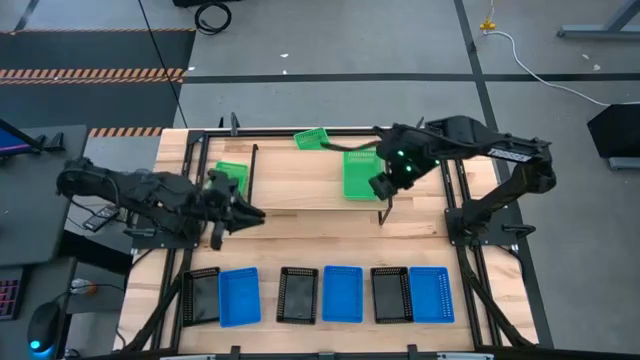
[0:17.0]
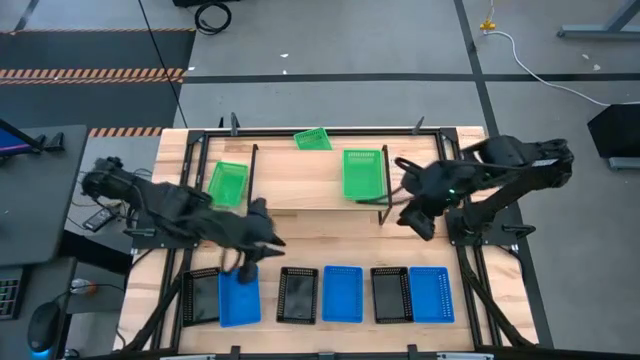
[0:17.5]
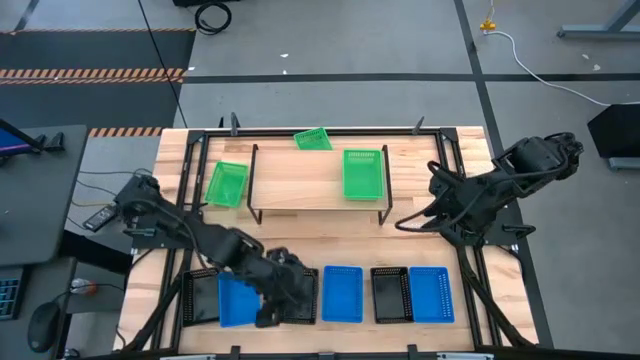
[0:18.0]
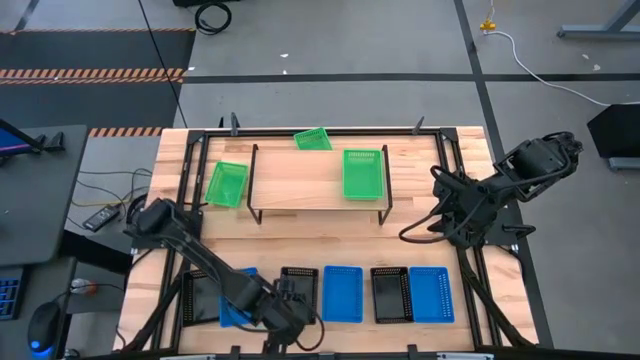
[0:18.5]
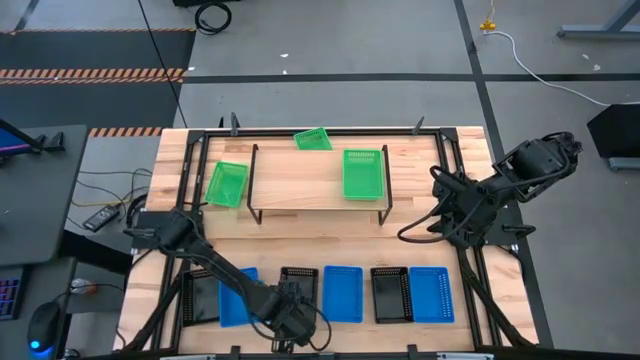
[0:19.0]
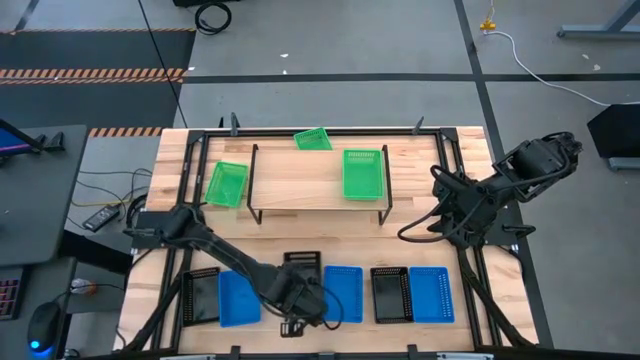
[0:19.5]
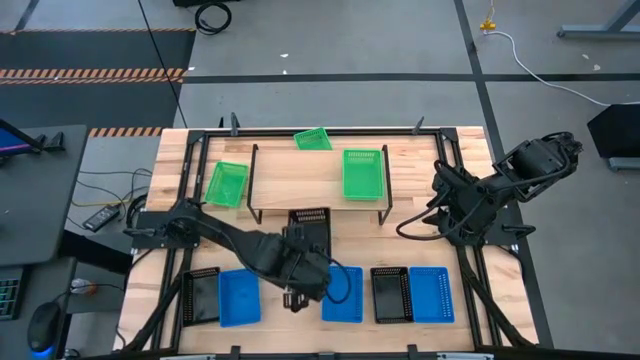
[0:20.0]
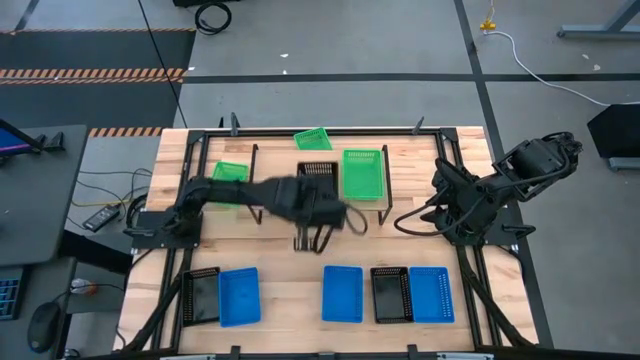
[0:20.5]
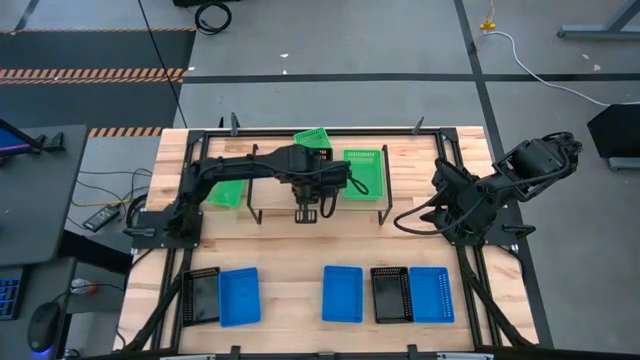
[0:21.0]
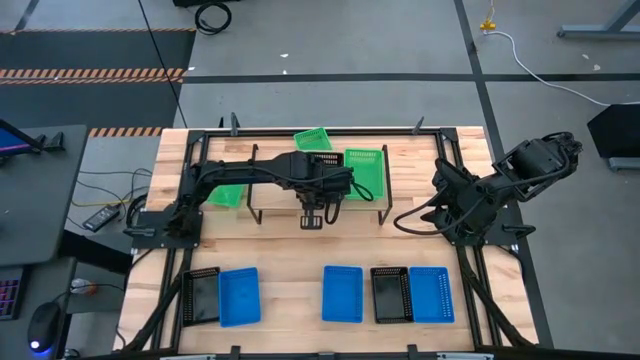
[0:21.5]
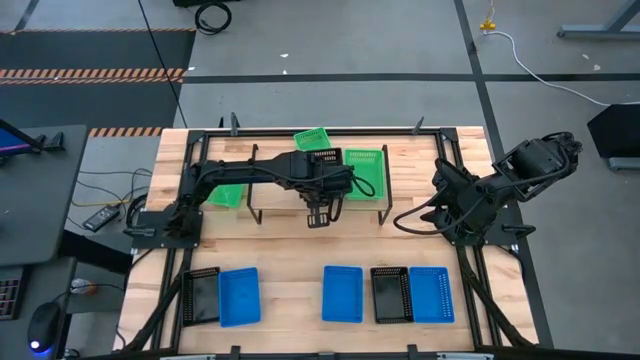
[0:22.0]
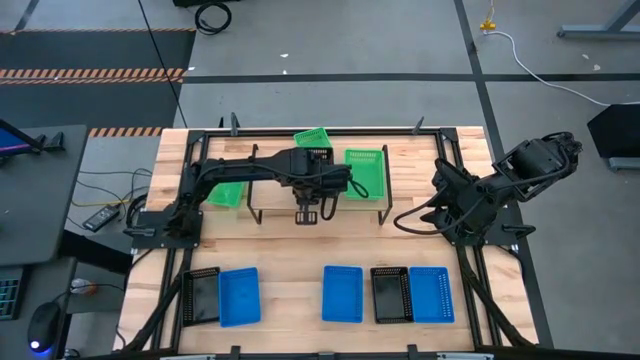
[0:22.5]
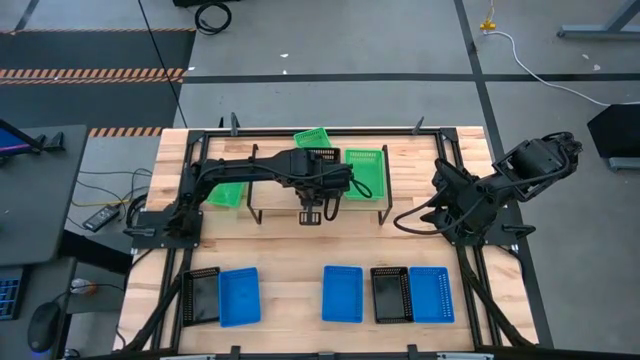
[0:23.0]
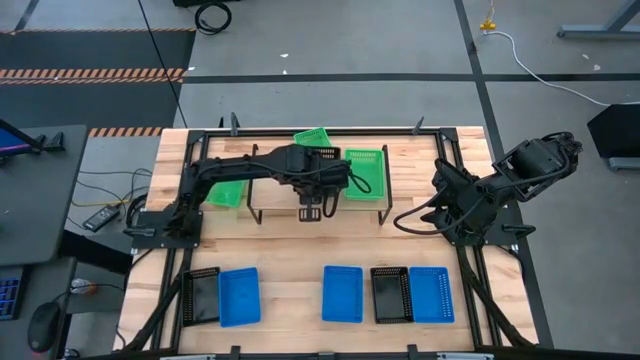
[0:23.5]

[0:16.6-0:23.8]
Task: Stack baskets on shelf by color
Put the middle black bin on the shelf

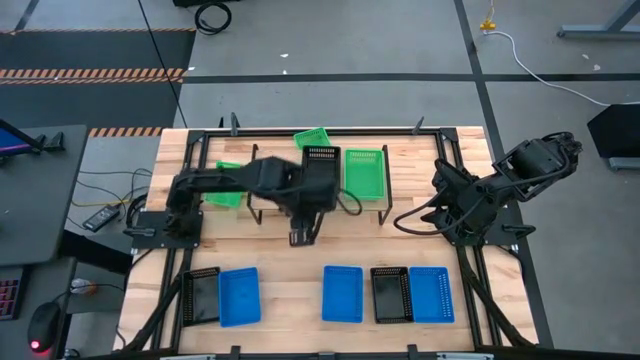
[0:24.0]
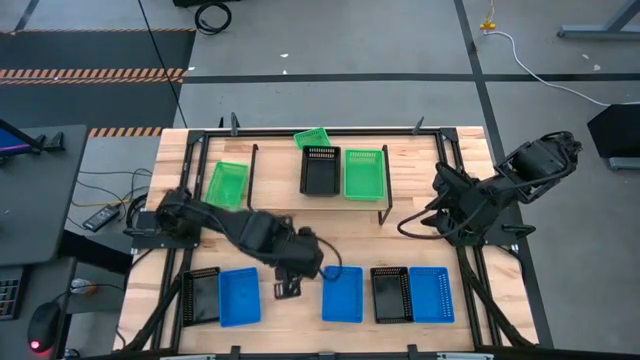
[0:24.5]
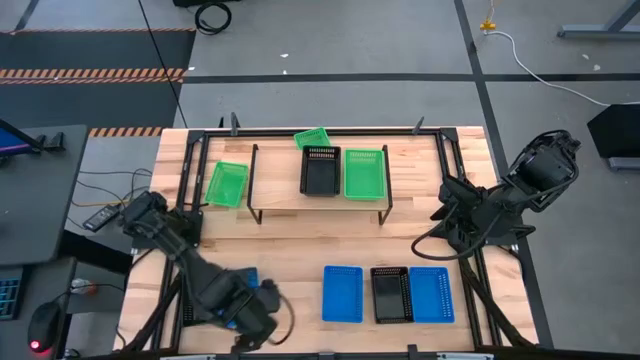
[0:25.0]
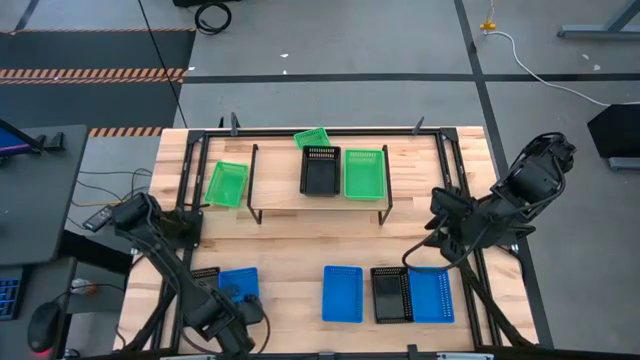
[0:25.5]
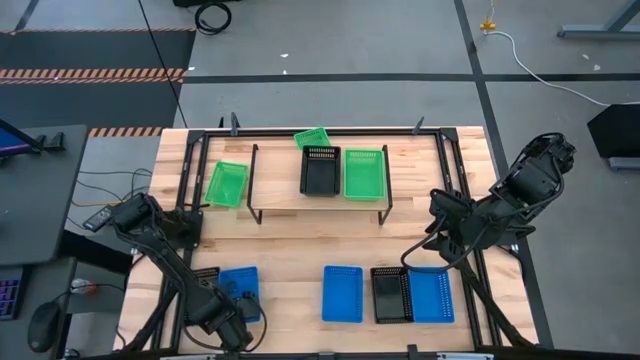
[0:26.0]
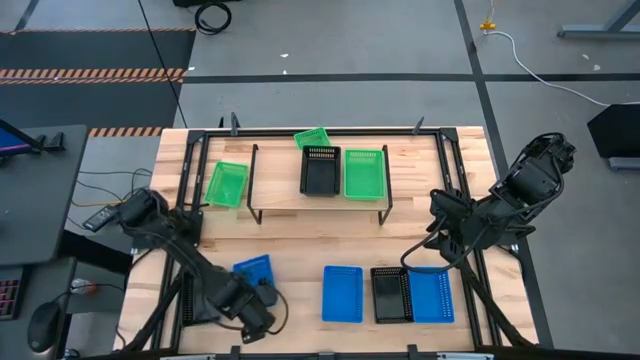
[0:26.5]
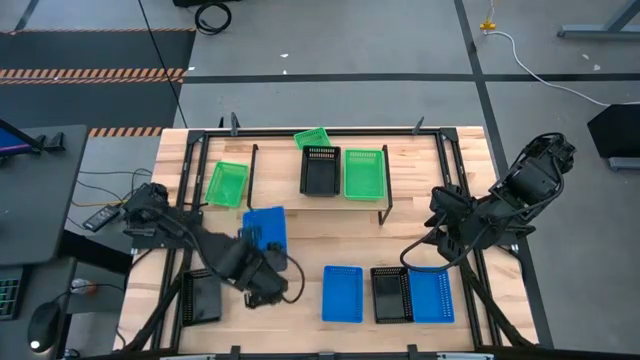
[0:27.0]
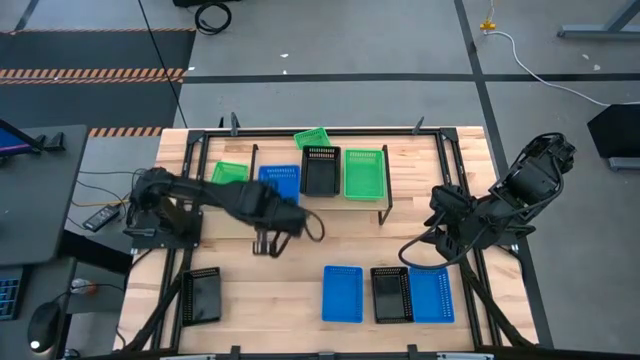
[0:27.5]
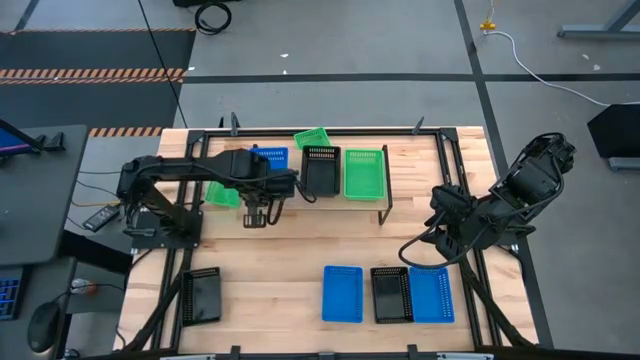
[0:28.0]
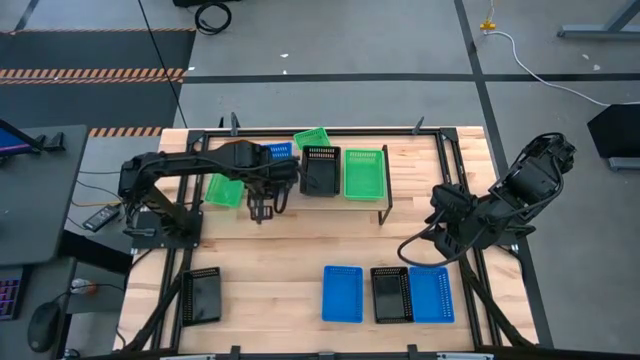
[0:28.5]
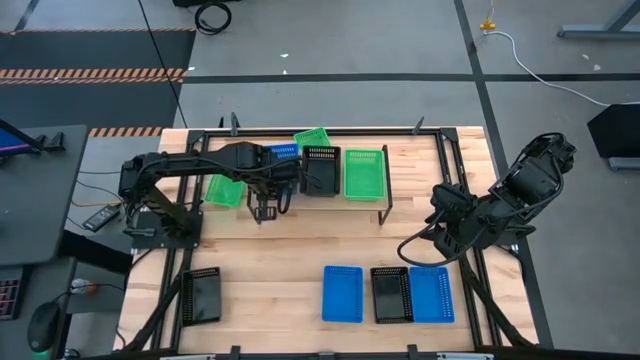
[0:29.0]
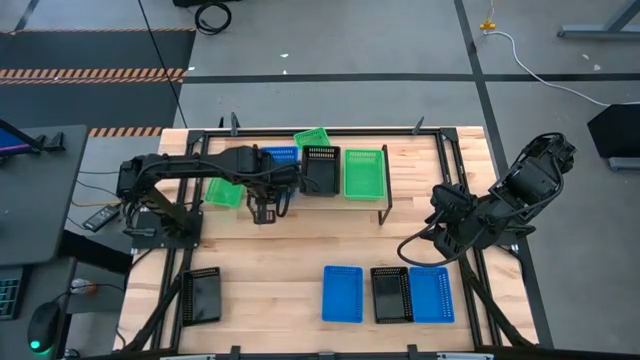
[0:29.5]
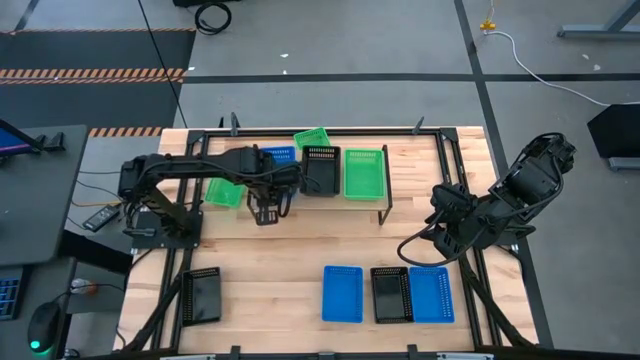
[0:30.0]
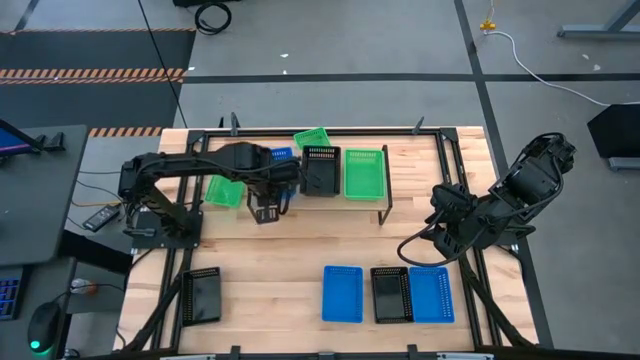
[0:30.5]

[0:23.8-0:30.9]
Put the left blue bin on the shelf

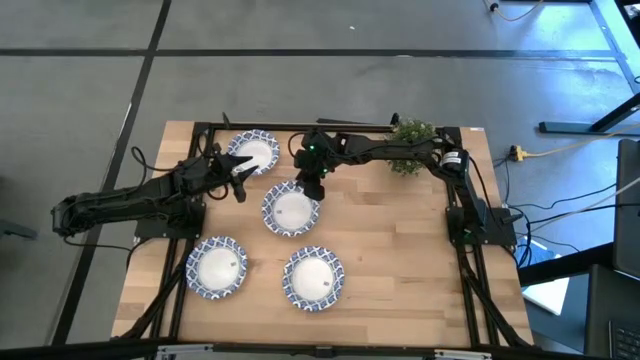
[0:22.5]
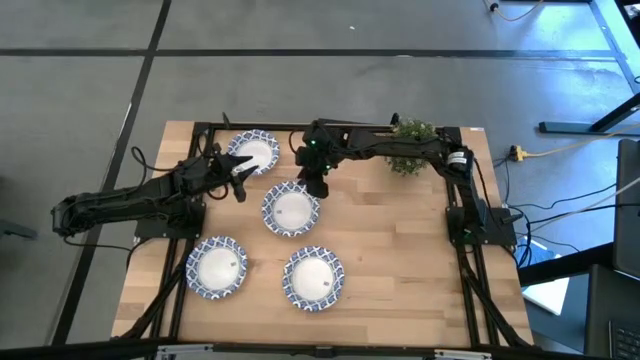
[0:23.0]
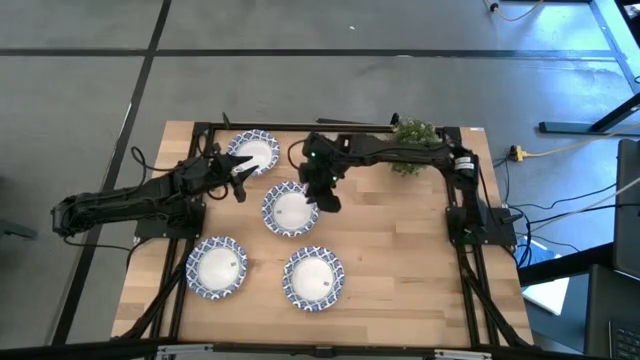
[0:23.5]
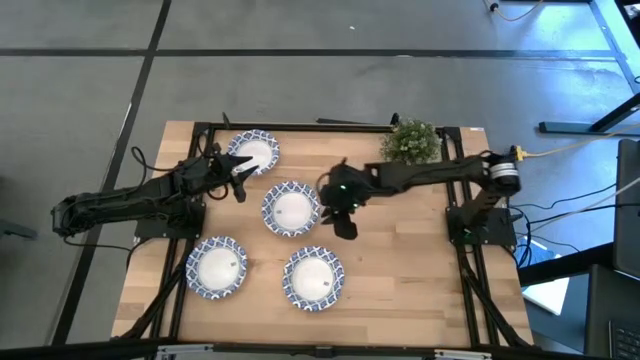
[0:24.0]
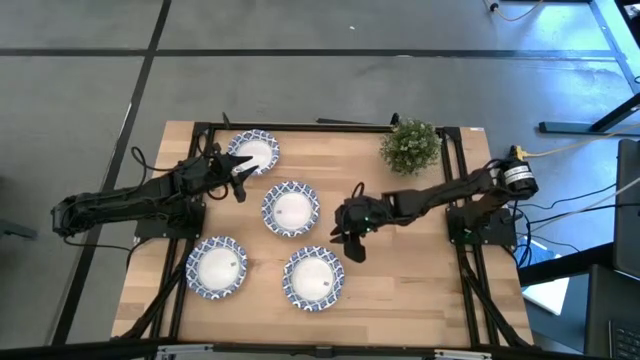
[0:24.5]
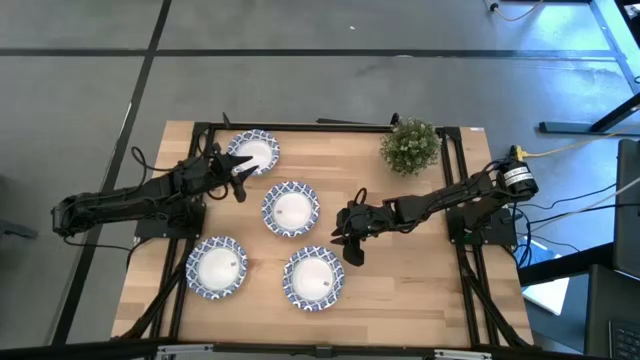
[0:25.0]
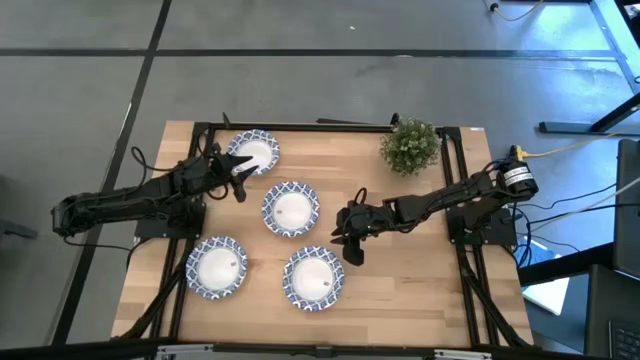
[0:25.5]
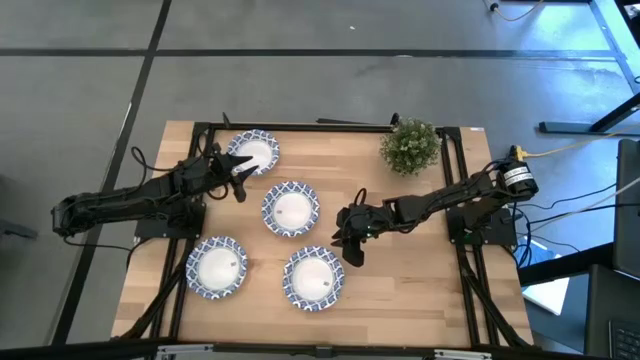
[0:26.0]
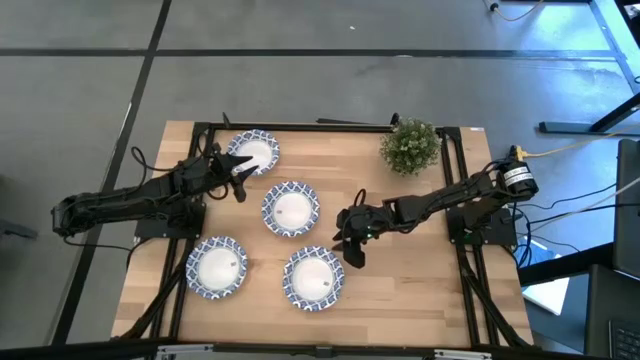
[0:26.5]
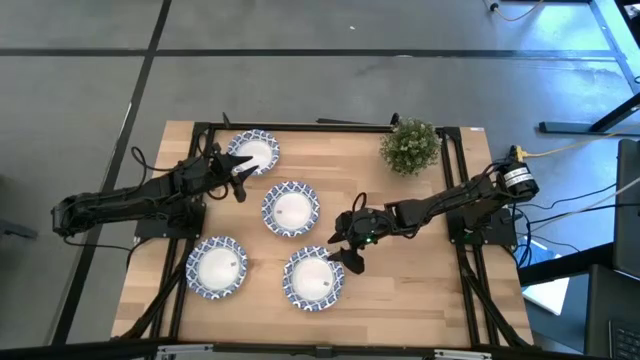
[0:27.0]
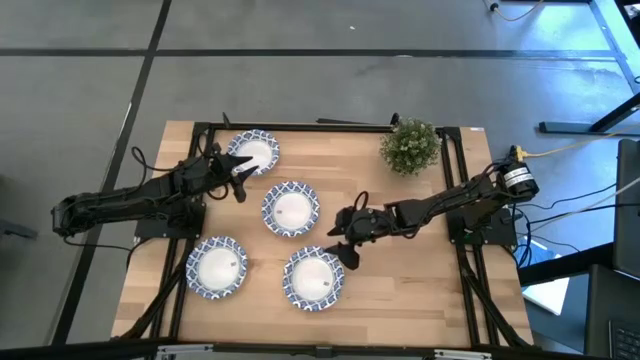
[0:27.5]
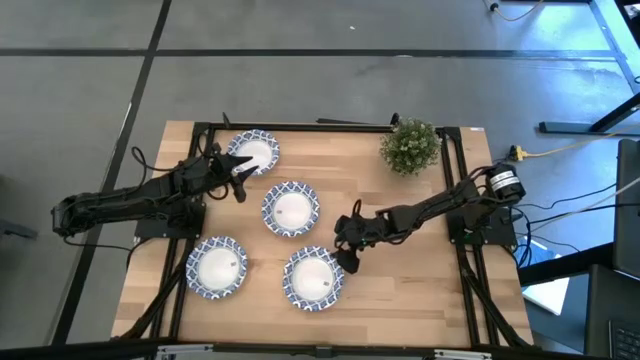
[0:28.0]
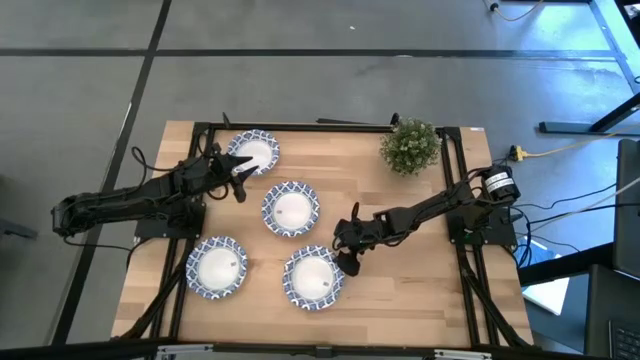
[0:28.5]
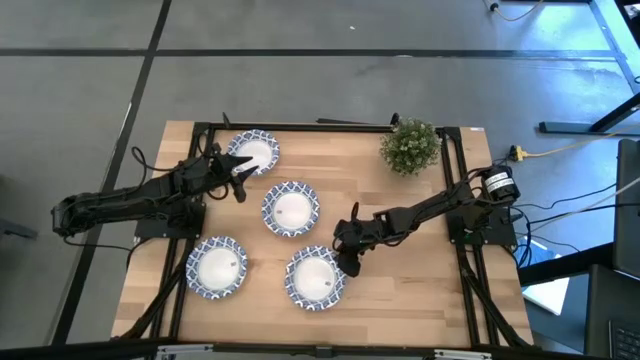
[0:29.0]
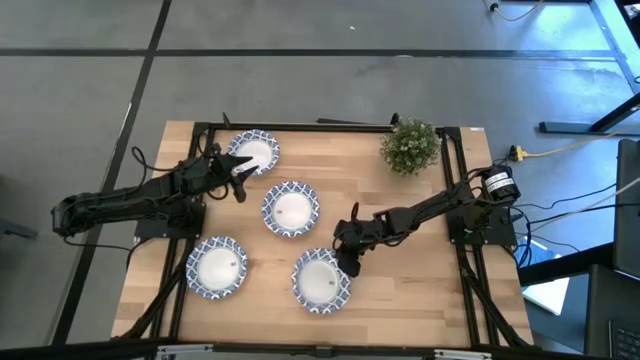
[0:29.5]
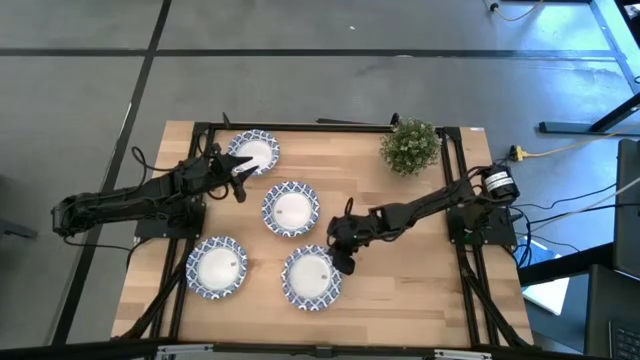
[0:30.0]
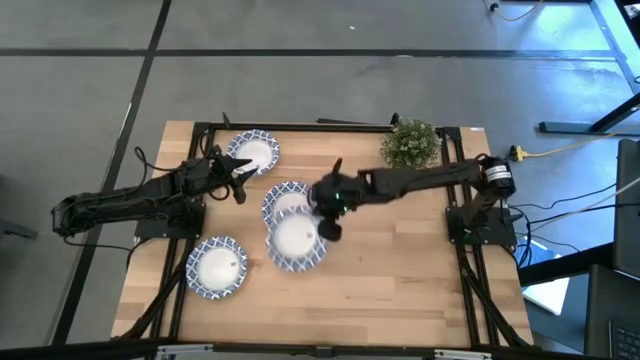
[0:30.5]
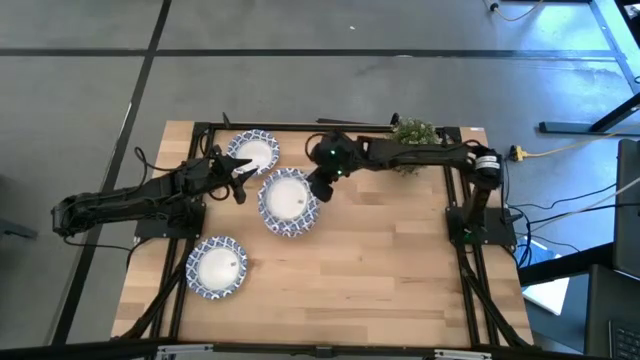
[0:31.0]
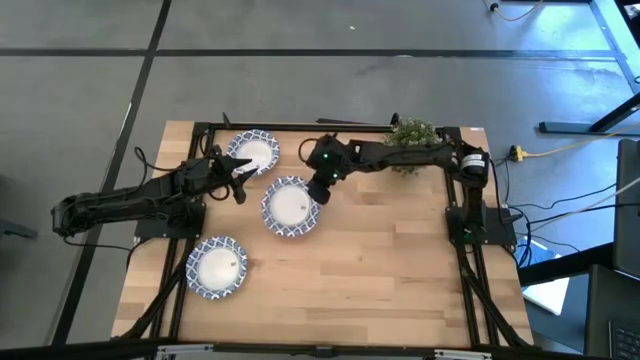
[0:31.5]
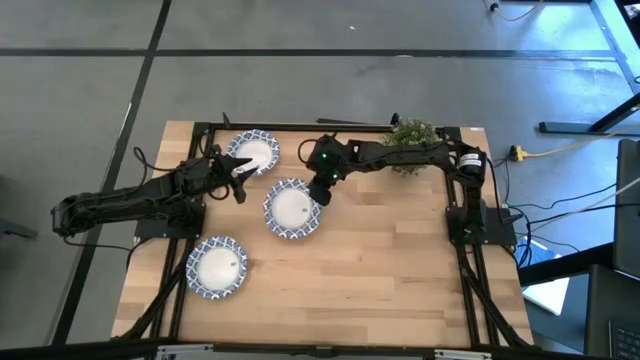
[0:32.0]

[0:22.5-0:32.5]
Task: Nest bowls inside each other
Stack the white patterned bowl on the other white patterned bowls
